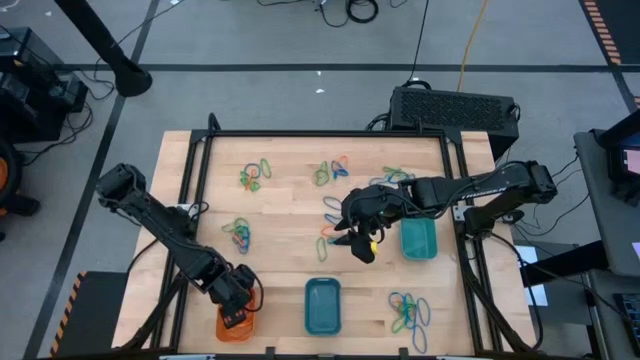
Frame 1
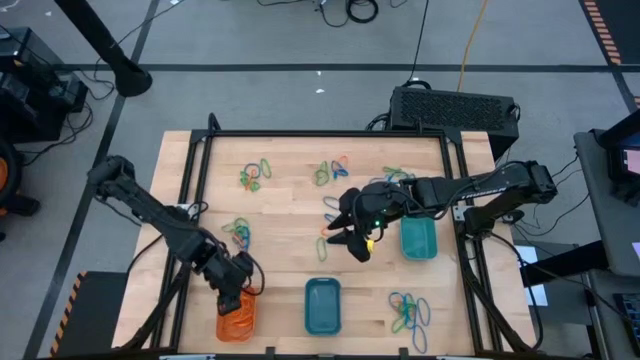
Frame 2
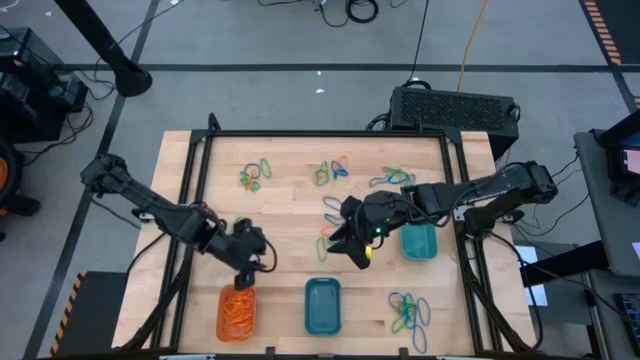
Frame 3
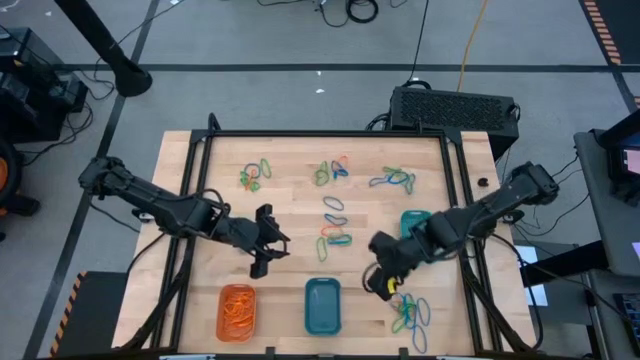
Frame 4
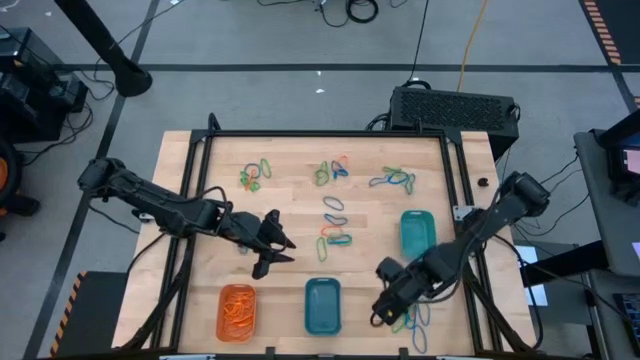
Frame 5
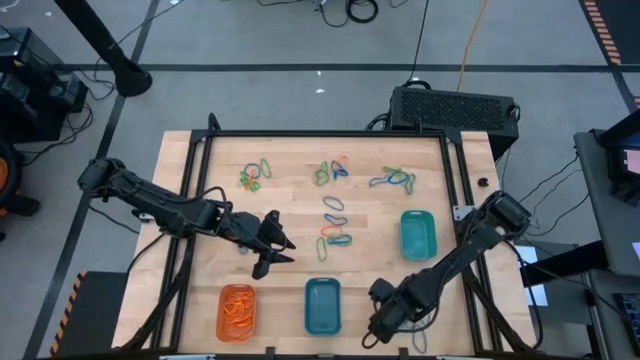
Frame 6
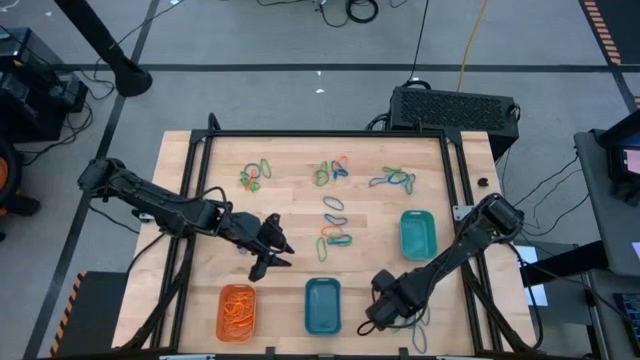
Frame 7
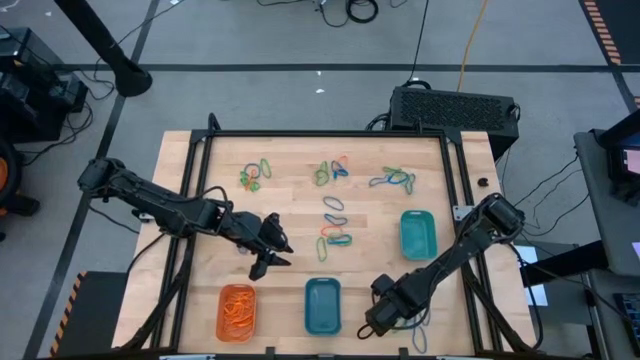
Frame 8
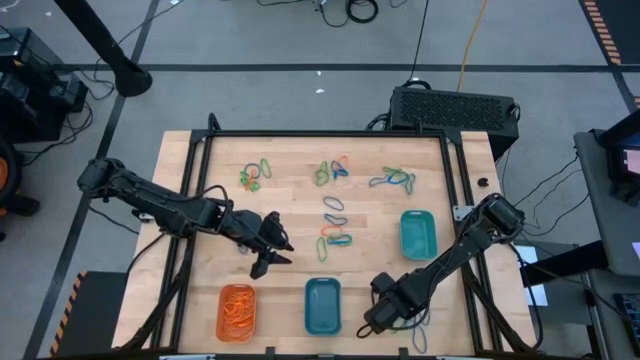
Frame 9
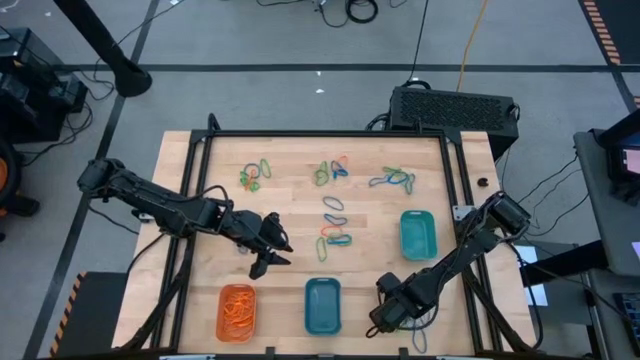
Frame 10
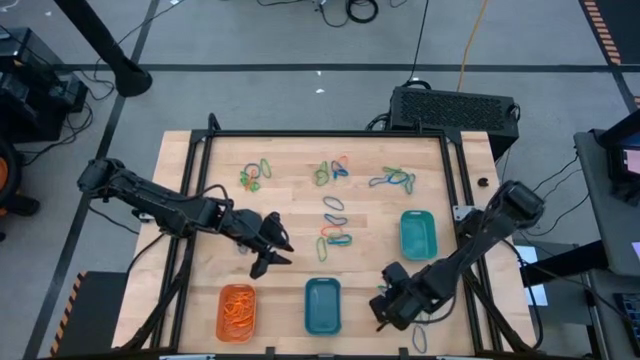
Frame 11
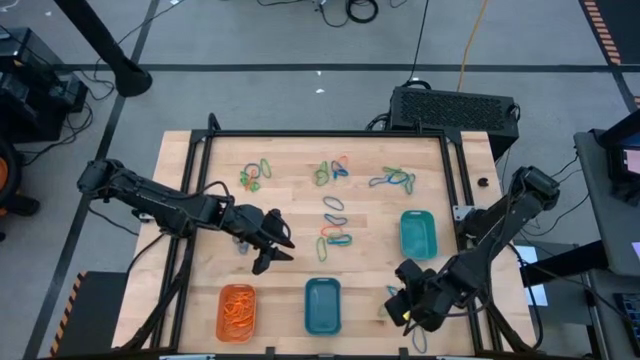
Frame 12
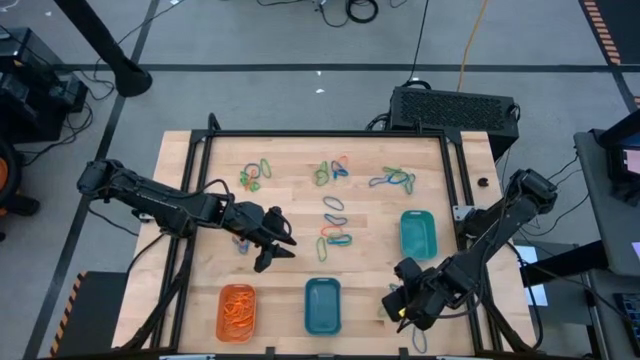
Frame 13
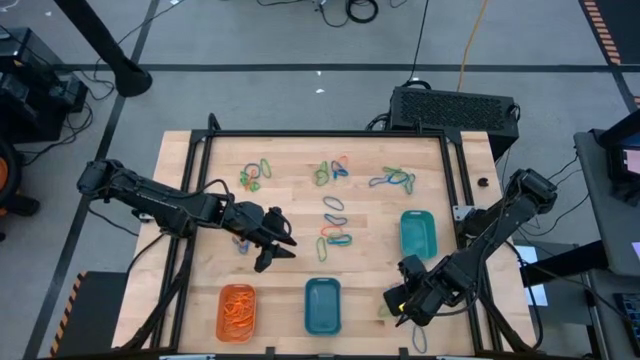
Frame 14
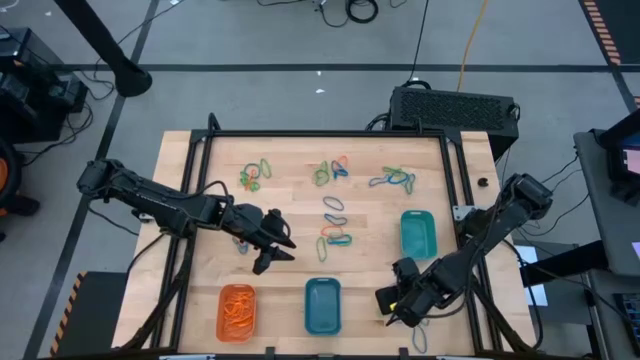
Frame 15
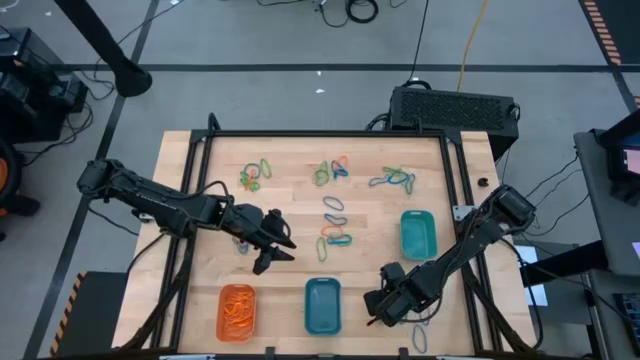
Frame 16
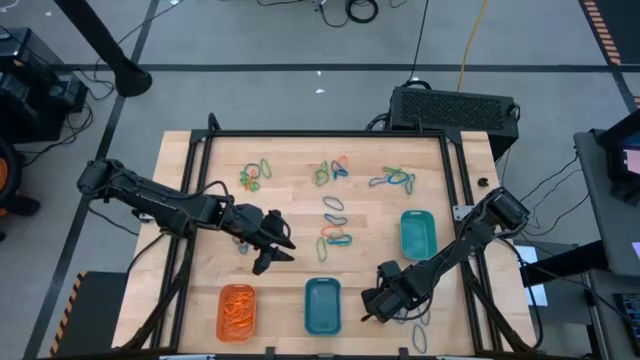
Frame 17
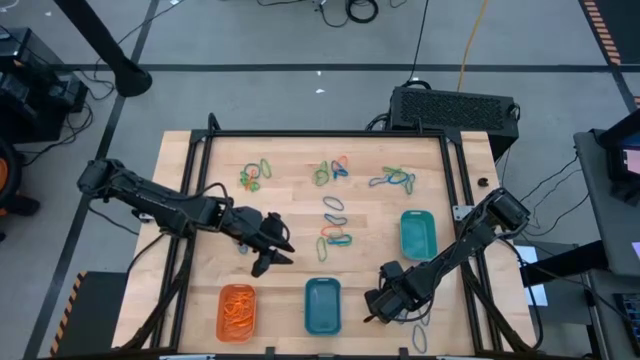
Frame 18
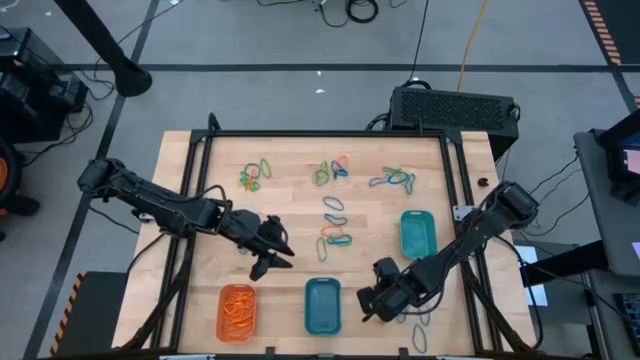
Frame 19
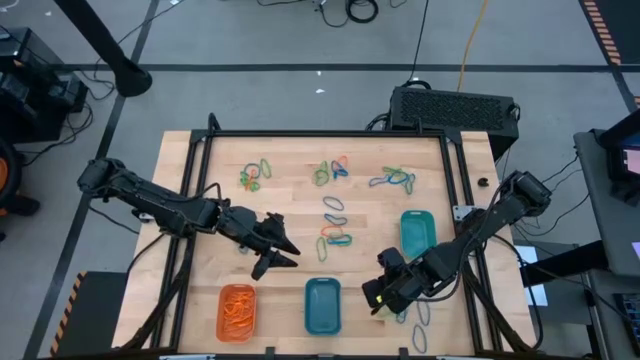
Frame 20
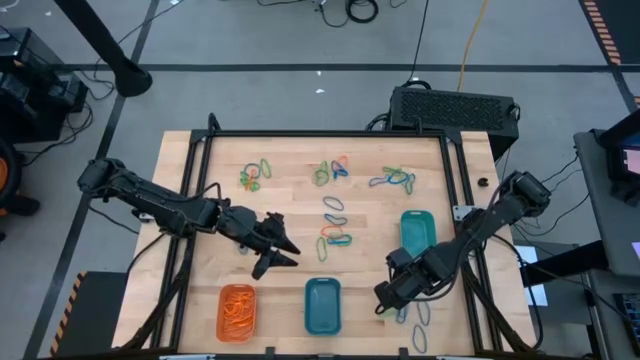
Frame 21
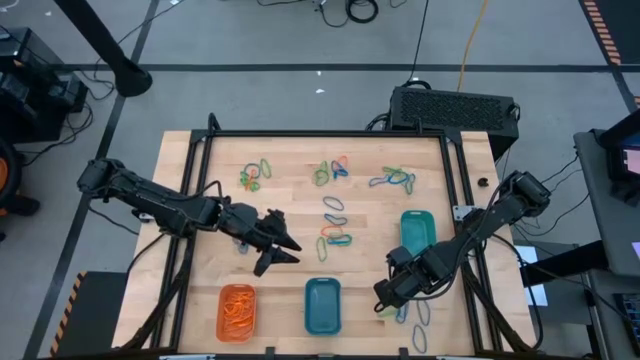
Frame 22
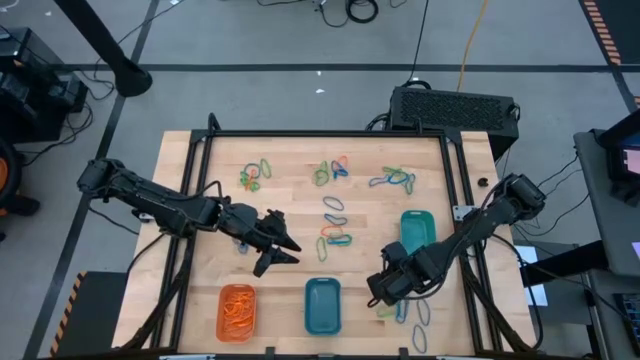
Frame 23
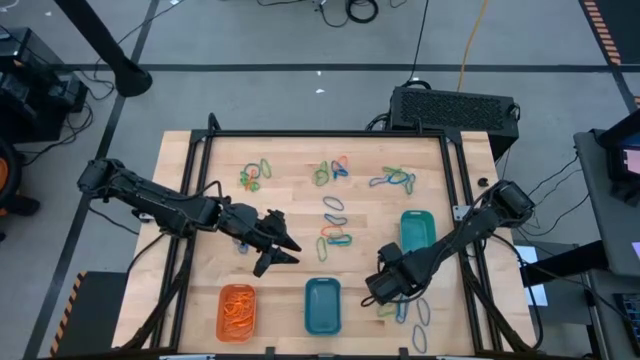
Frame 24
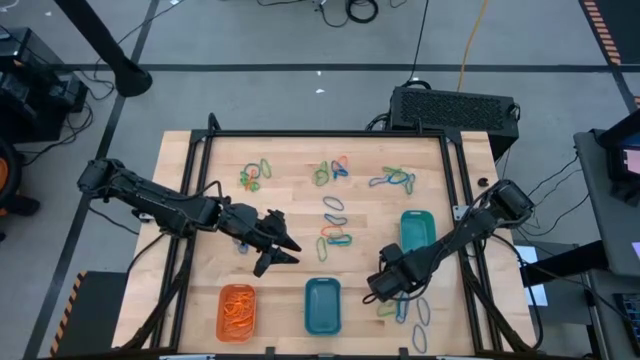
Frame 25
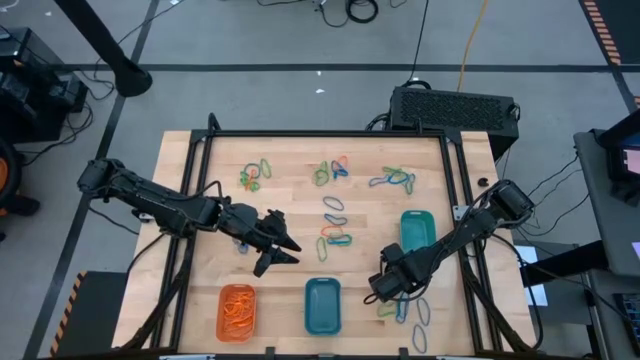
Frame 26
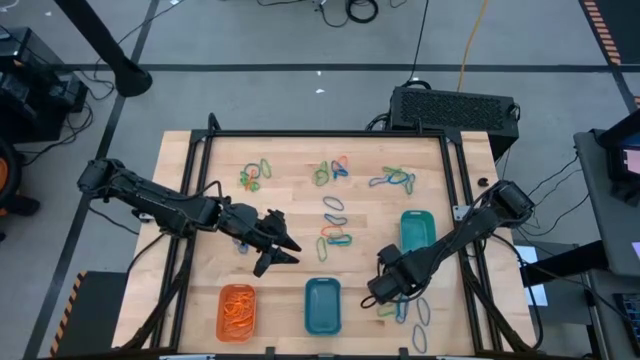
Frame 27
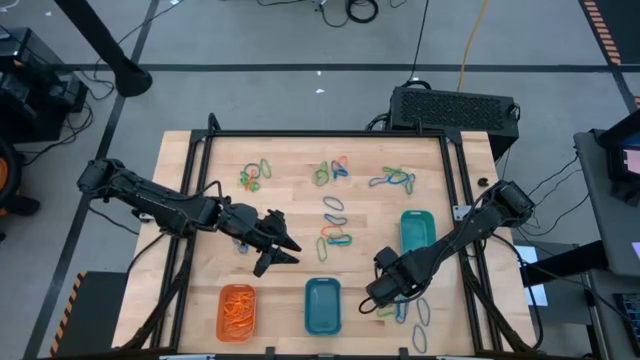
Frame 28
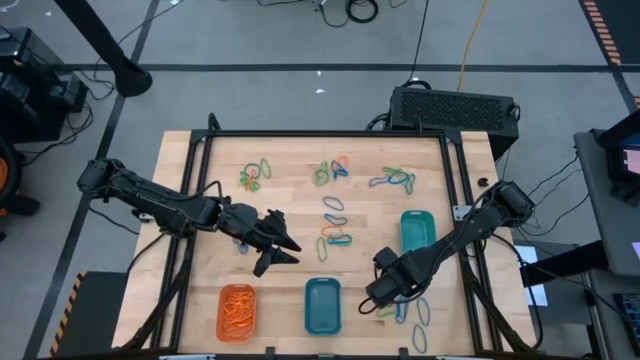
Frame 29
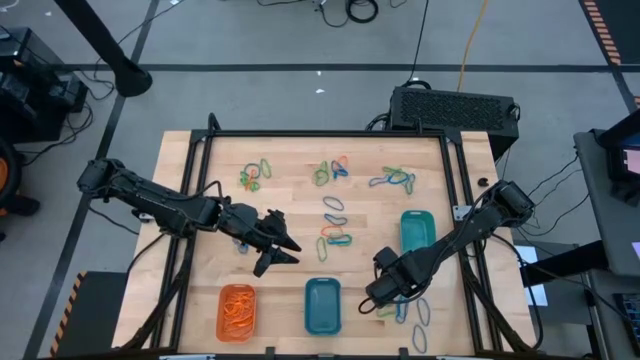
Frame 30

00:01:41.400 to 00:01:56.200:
Task: Sort rubber bands into baskets
Put the orange rubber band into the orange bin

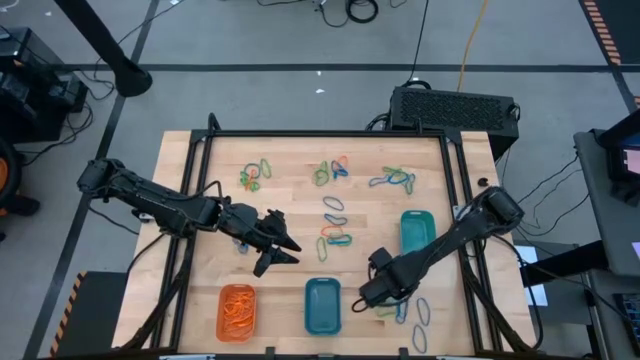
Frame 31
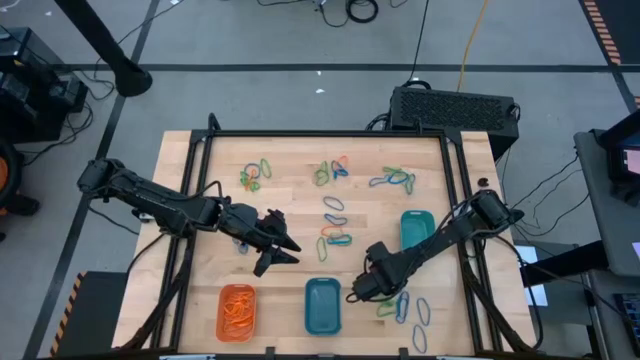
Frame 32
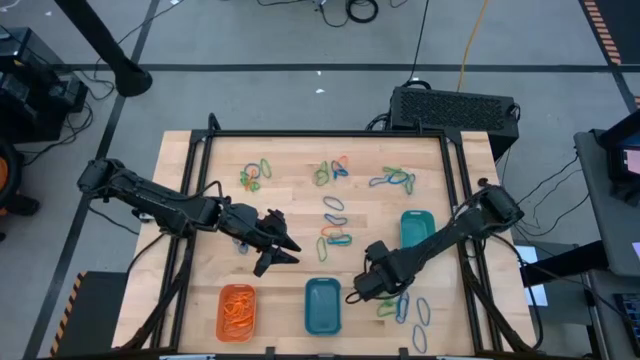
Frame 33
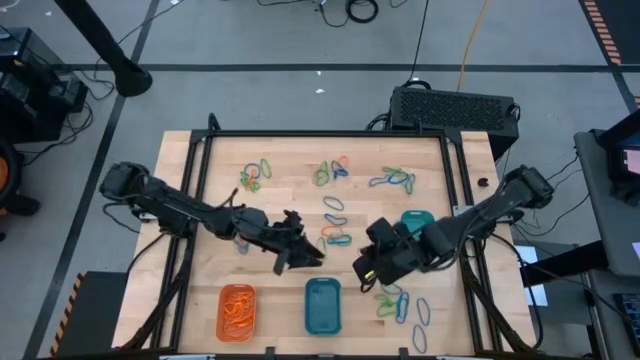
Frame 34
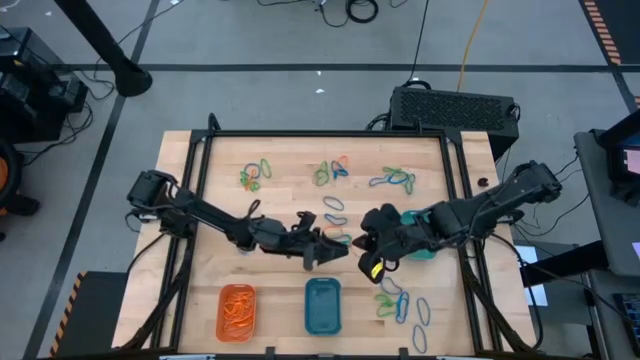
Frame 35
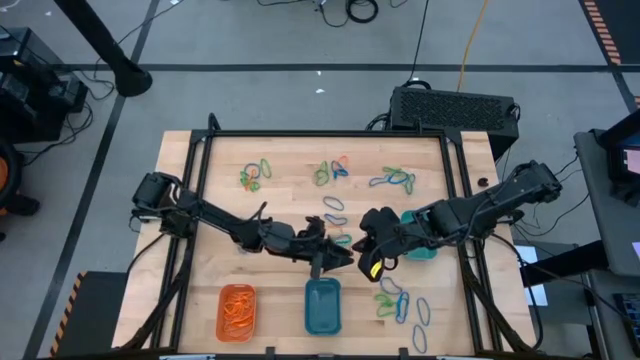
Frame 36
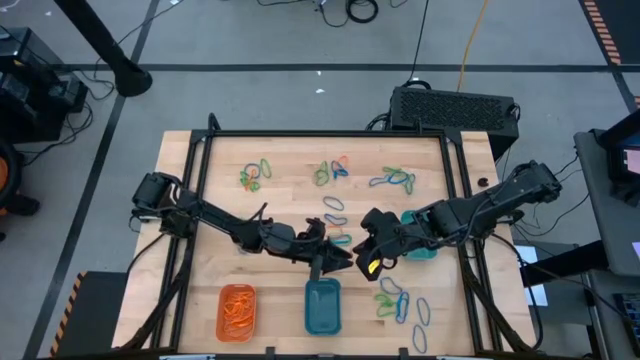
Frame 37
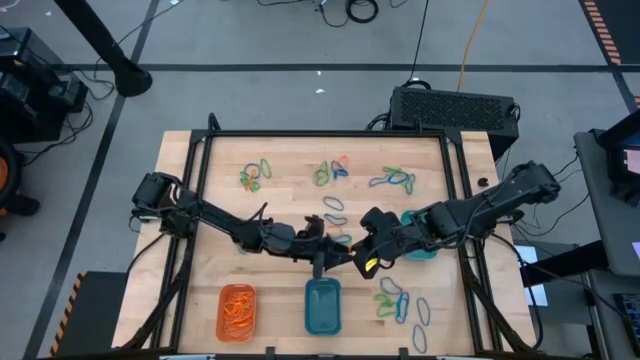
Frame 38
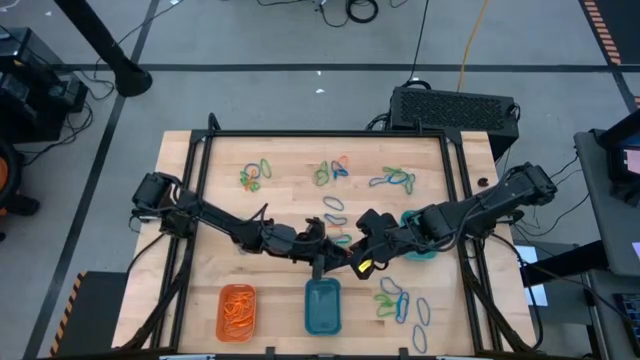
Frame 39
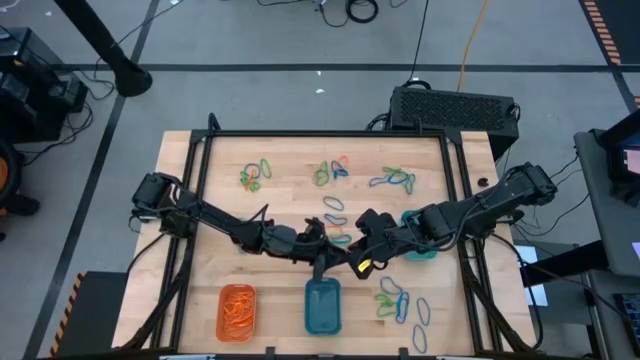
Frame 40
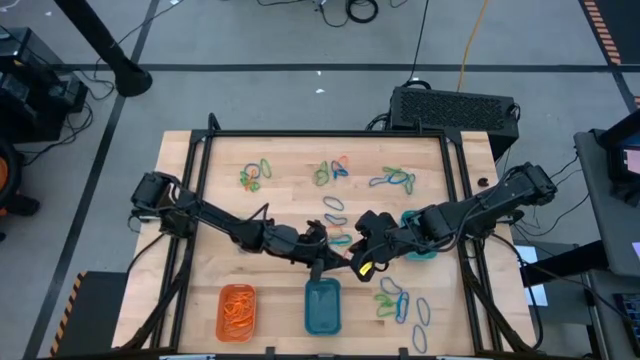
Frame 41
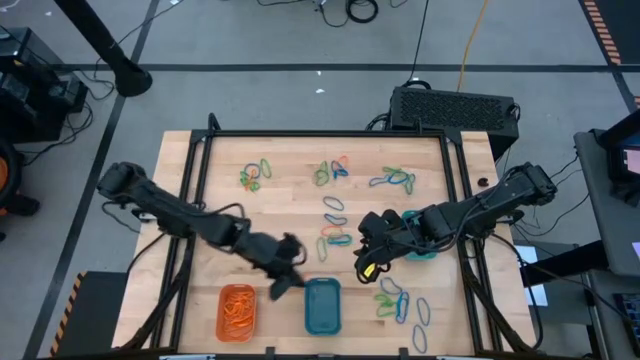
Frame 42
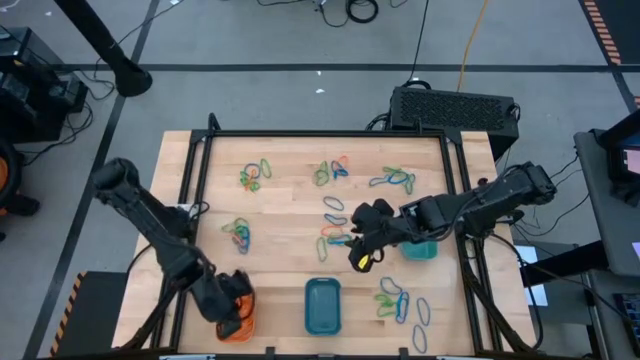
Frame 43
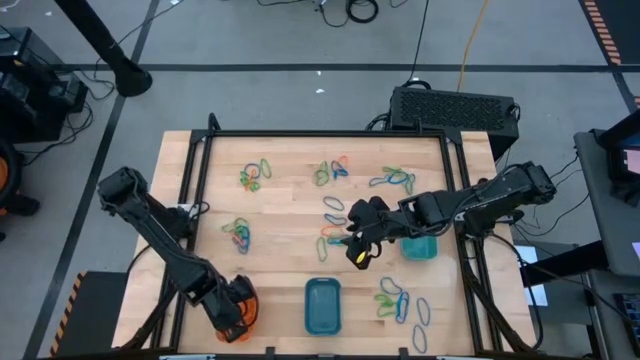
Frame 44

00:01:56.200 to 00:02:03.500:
Put the orange rubber band into the orange bin
